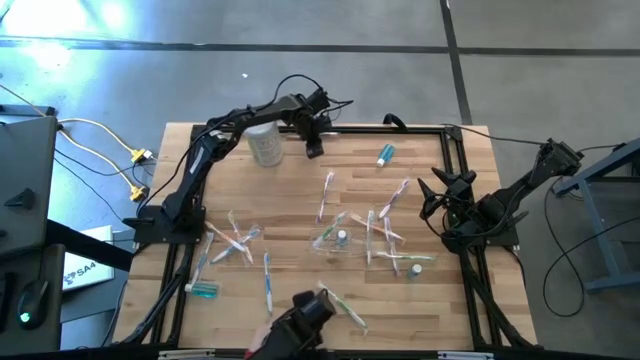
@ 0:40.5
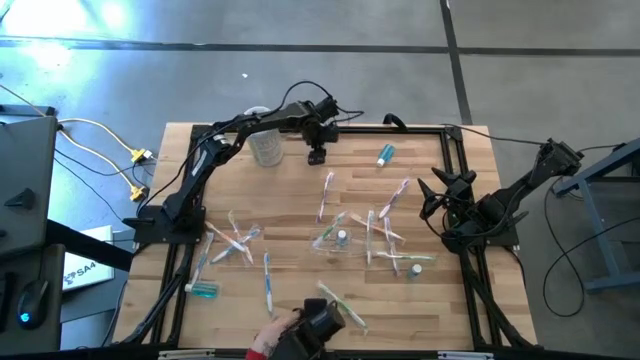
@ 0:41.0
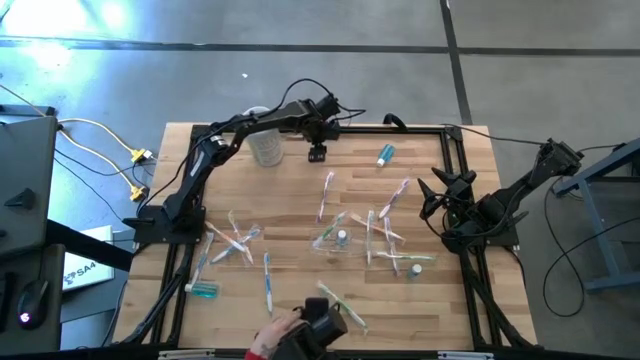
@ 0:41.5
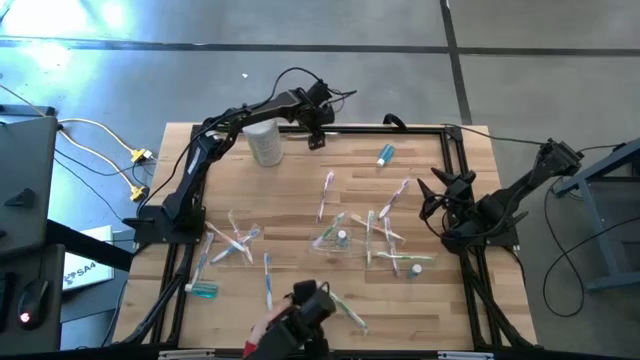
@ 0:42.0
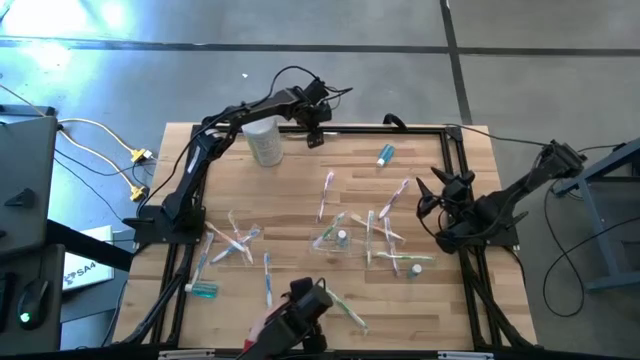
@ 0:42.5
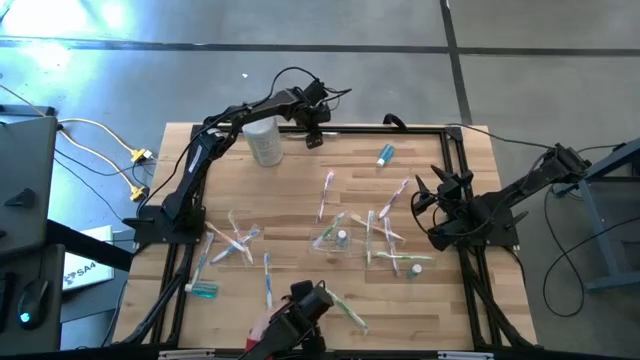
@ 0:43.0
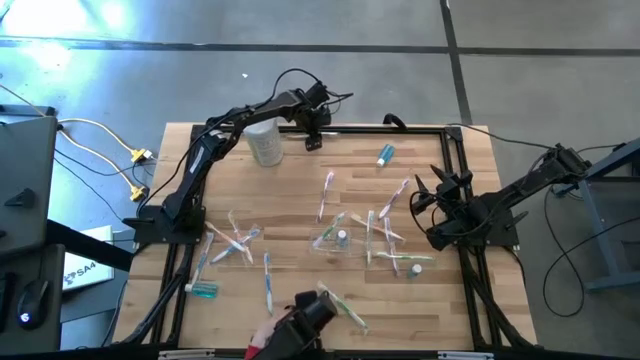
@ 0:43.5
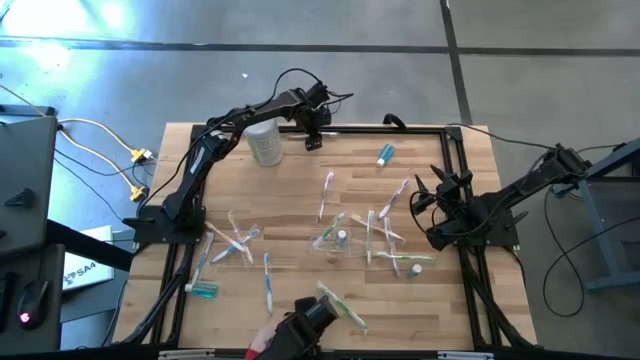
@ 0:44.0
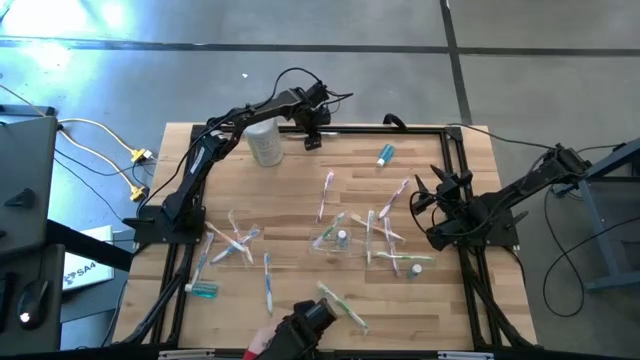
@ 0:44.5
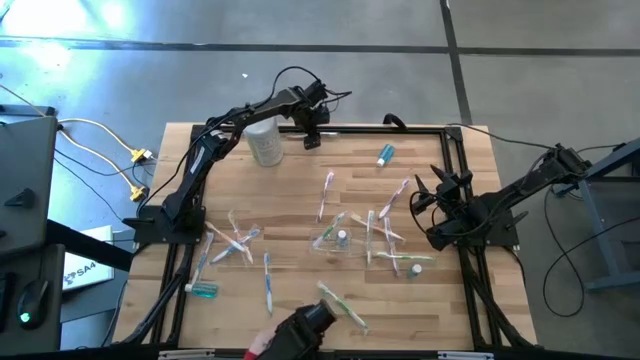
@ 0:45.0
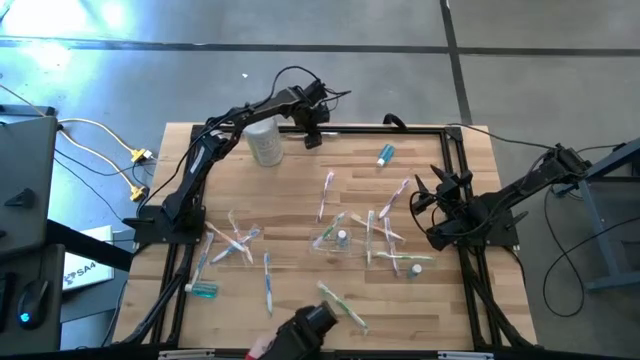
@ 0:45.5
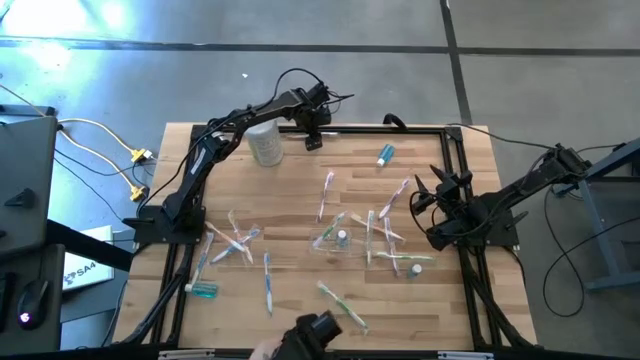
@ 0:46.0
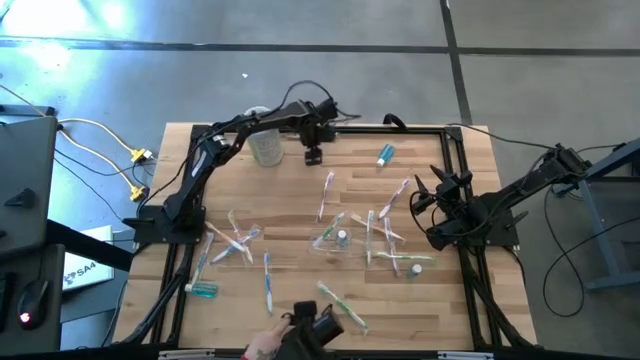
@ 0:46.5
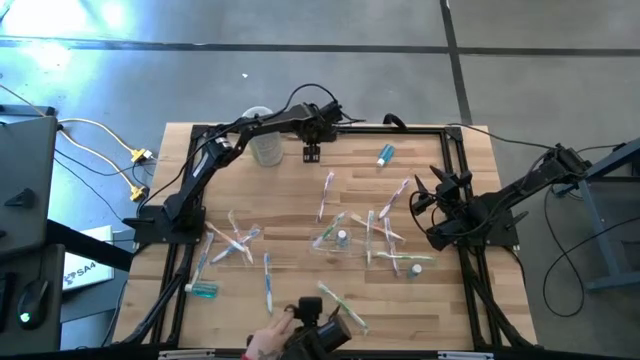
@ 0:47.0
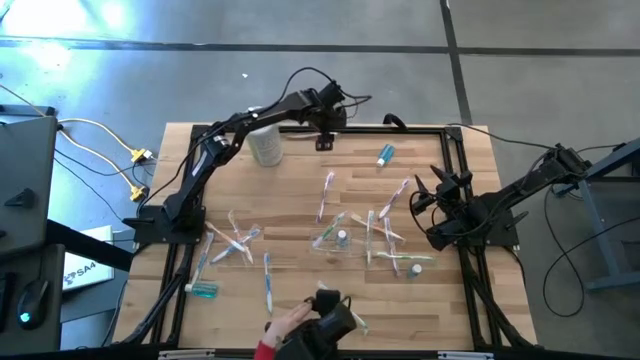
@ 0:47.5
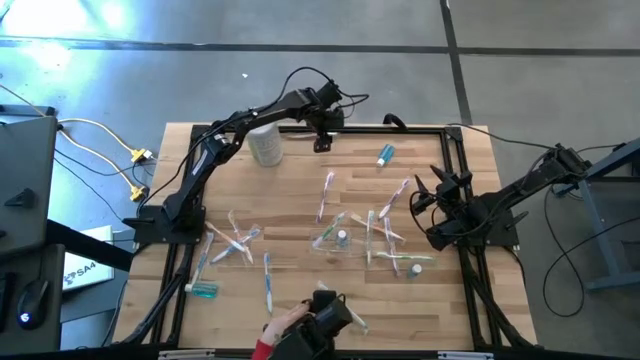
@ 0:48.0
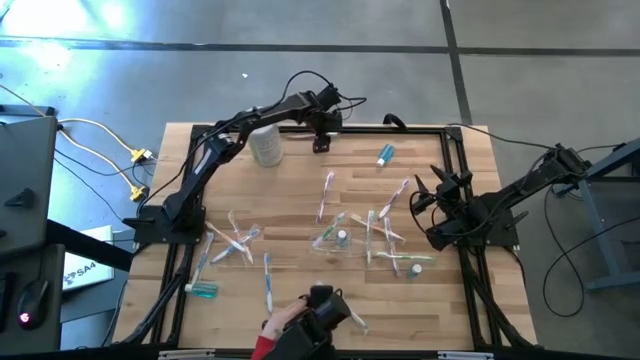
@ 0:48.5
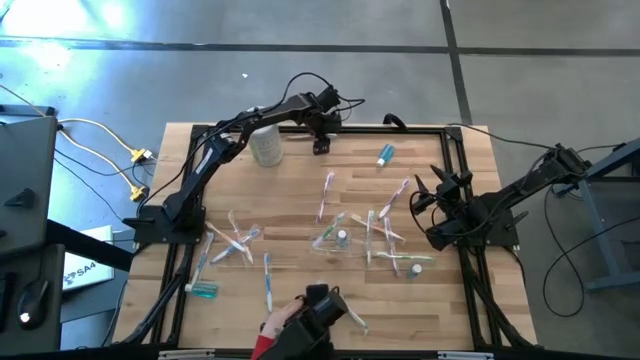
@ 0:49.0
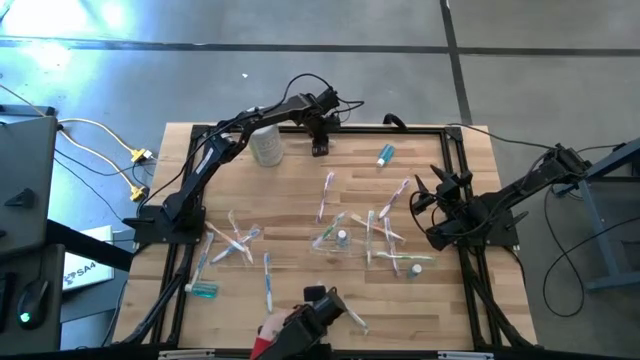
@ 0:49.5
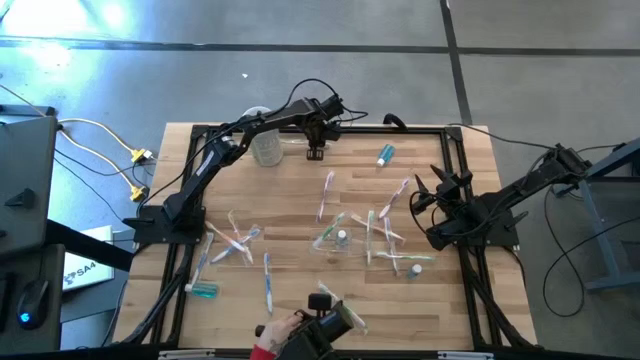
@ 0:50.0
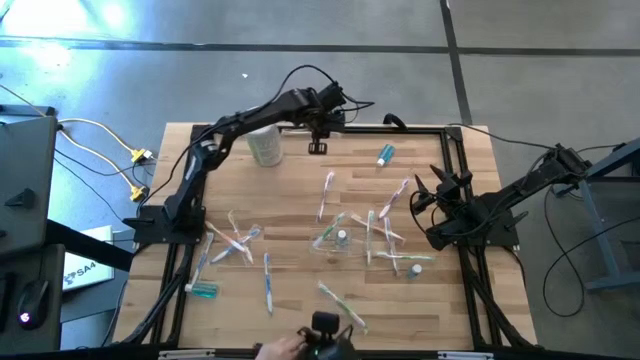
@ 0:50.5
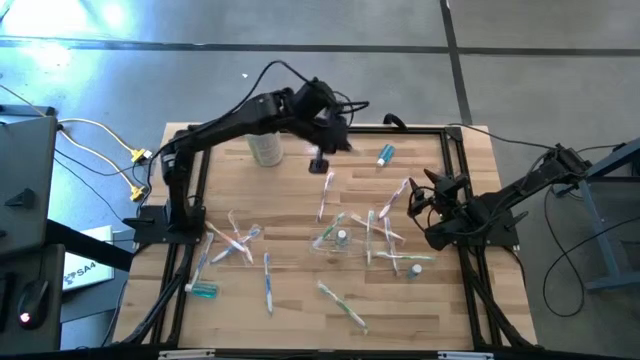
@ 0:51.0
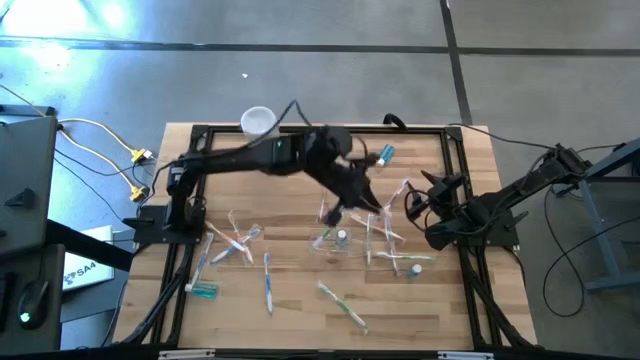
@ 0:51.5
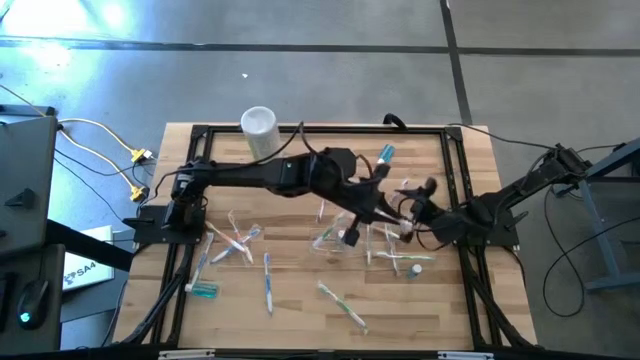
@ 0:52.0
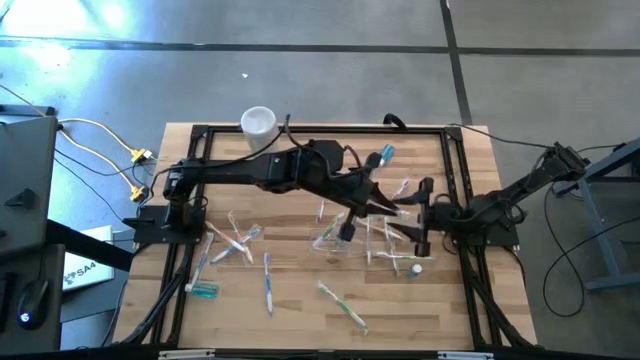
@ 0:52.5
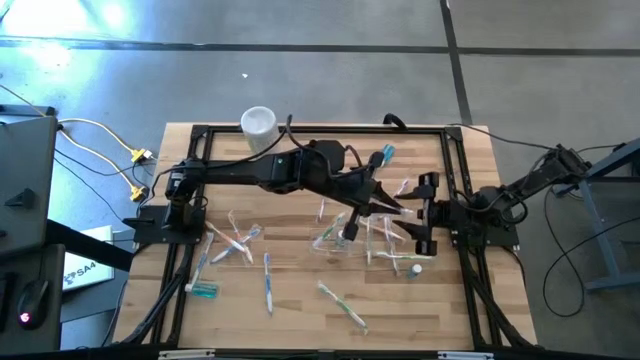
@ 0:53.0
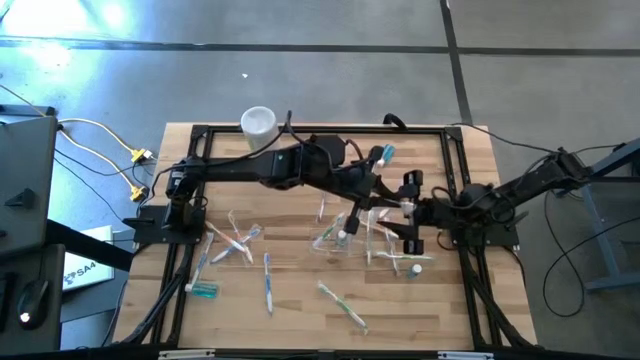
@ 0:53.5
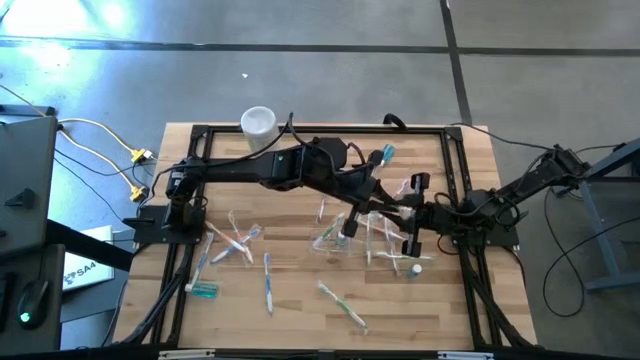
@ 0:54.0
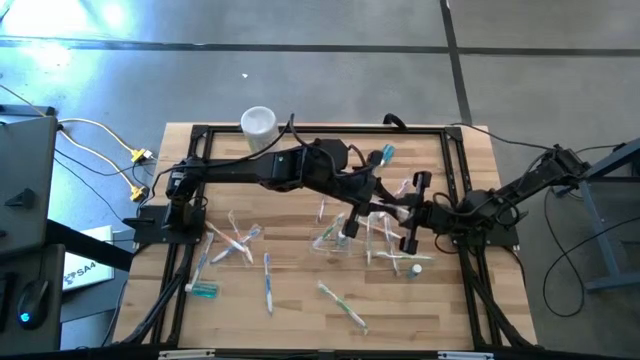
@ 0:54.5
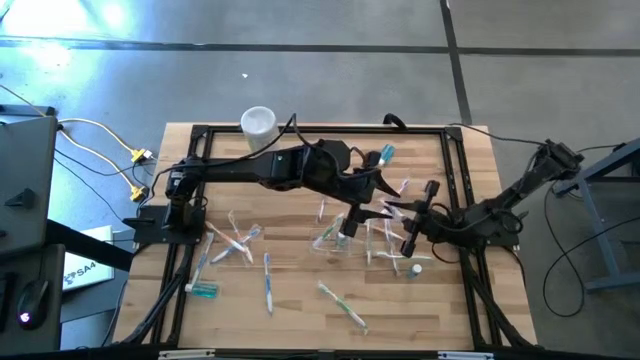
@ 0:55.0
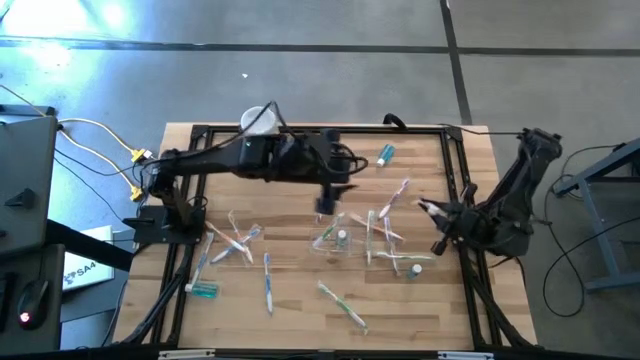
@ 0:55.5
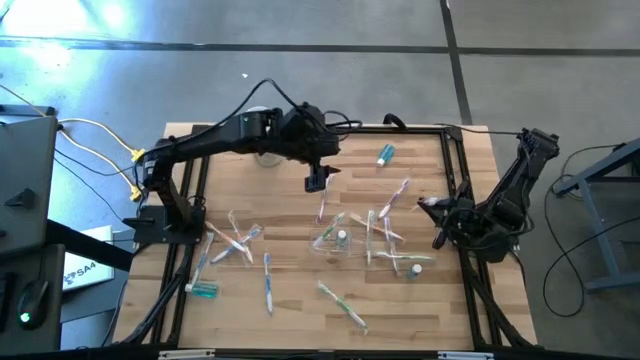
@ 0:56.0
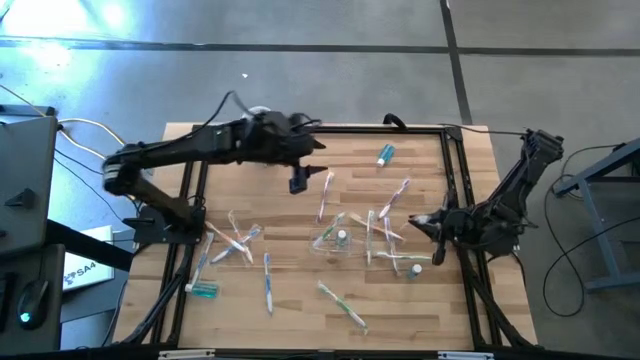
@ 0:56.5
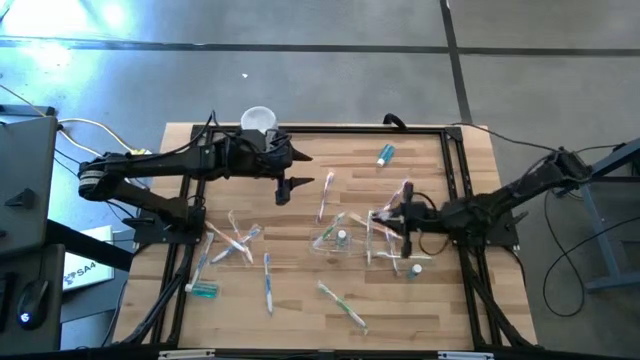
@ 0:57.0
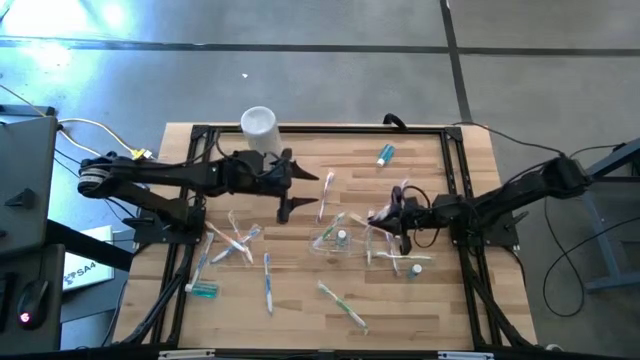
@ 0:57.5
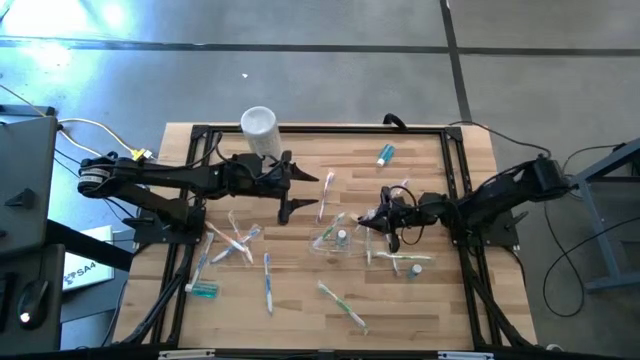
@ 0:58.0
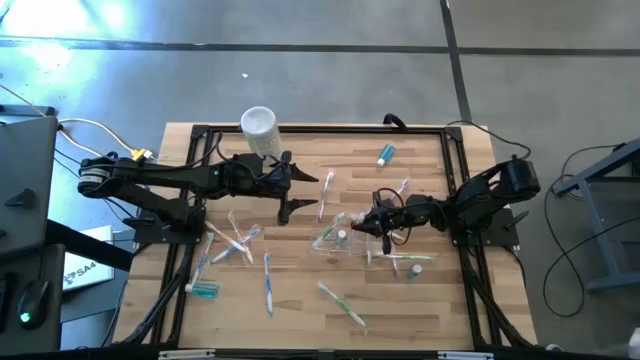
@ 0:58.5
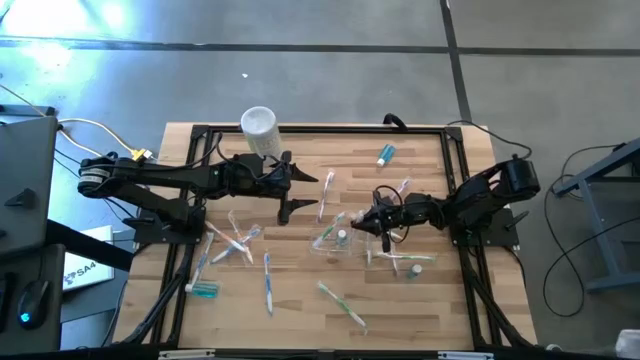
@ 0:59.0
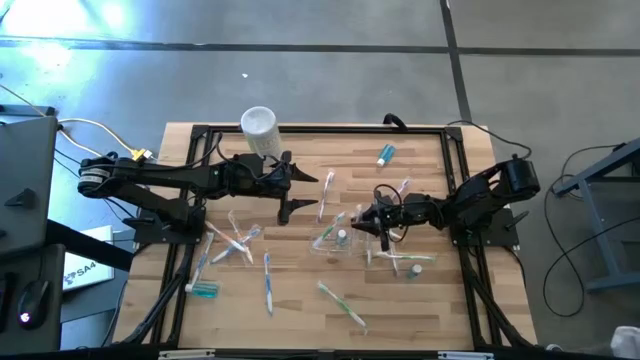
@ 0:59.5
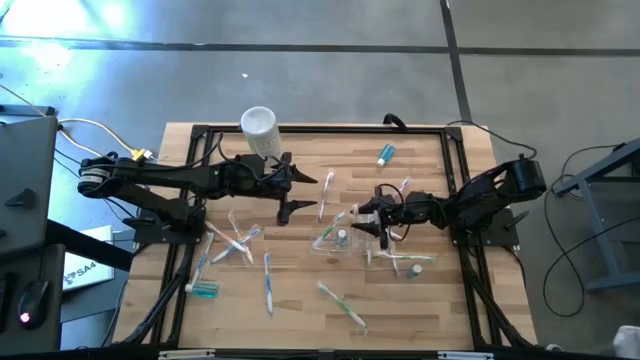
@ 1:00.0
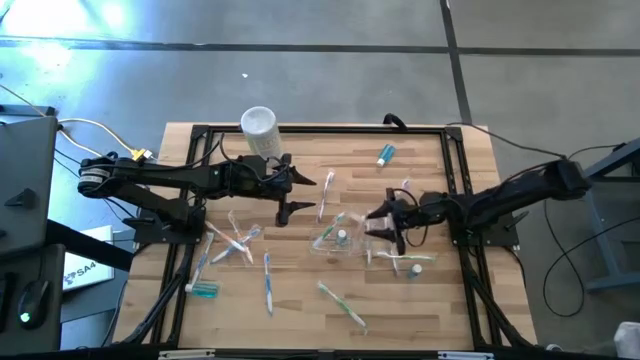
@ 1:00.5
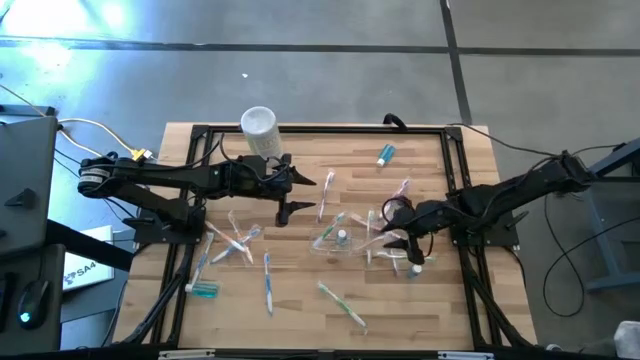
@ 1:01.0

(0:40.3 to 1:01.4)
Task: Pick & Place toothbrushing station
Put the orange toothbrush into the right section of the transparent organizer
